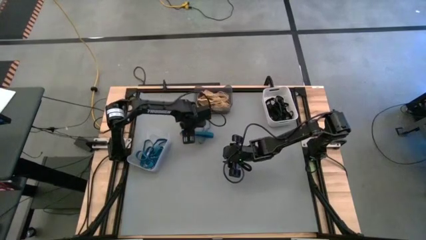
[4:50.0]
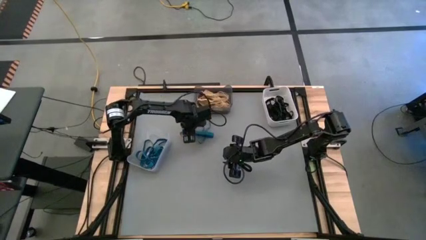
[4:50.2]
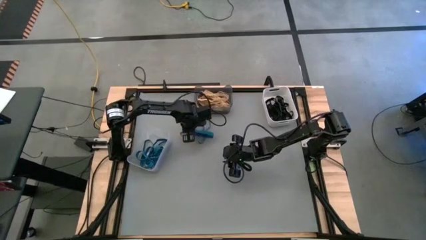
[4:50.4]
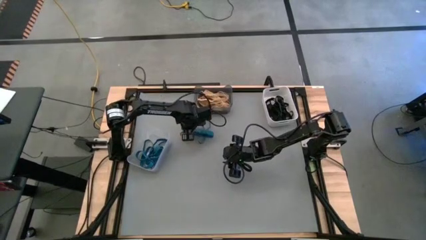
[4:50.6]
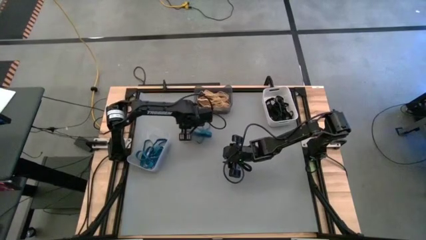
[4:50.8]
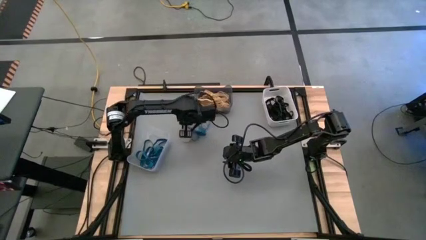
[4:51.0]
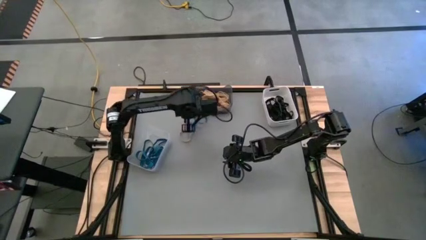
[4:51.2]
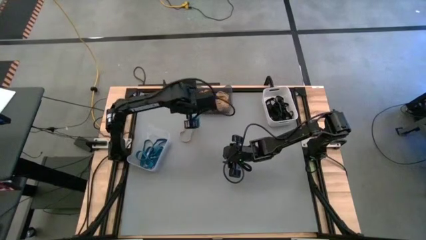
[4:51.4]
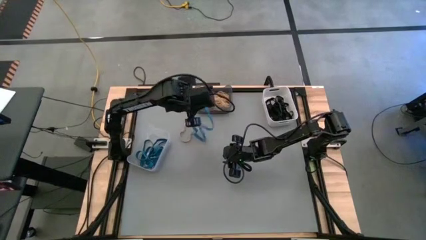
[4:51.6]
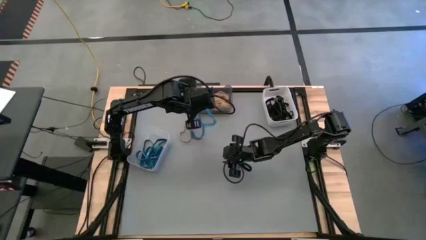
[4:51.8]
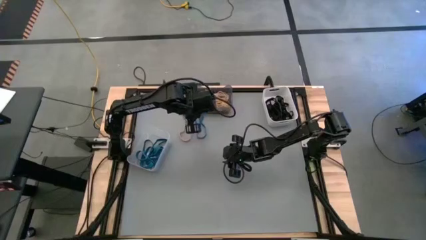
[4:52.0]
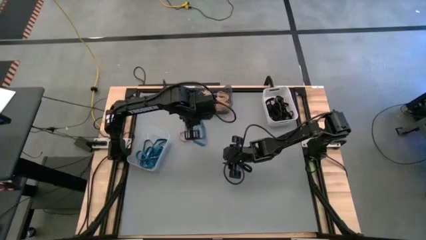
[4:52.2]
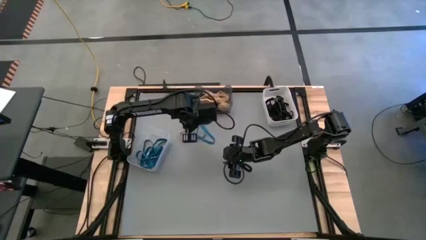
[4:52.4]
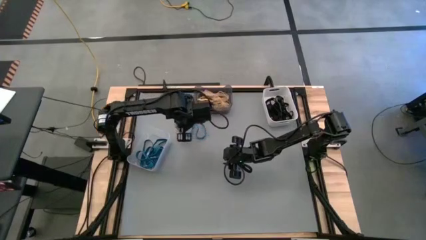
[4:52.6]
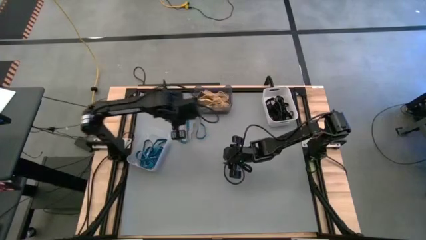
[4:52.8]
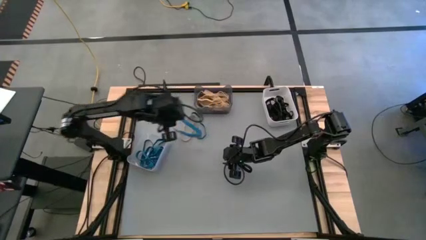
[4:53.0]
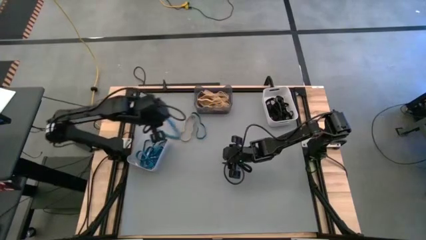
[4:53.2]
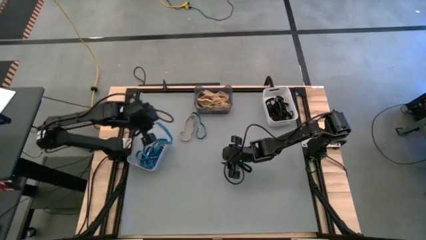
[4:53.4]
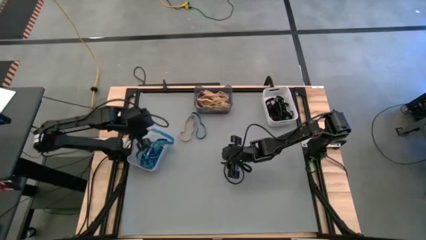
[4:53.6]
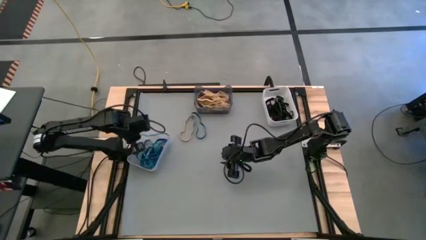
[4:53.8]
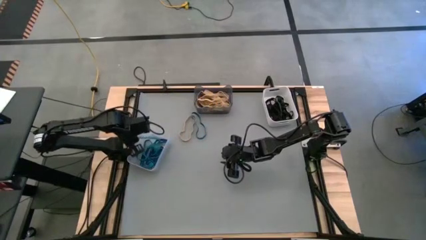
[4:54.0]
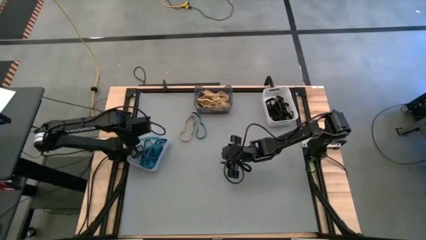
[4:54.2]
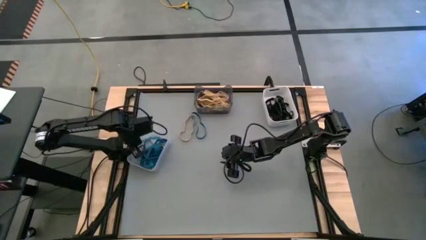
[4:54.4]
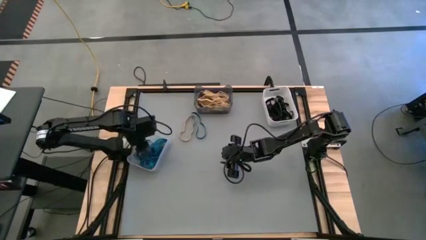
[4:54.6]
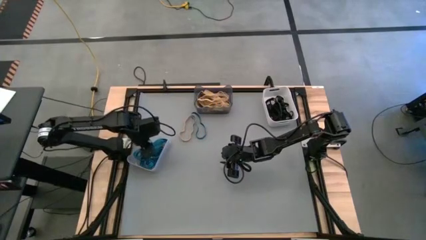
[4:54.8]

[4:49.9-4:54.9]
Task: Sort rubber bands into baskets
Put the blue rubber band into the transparent bin

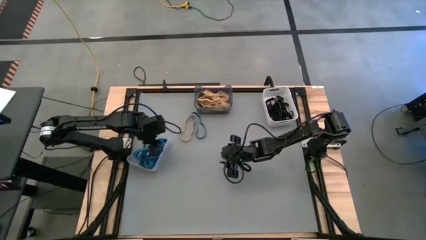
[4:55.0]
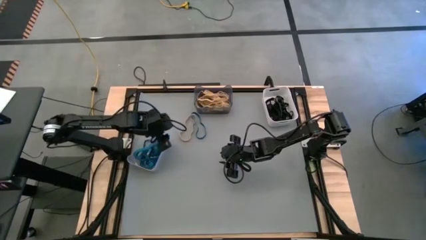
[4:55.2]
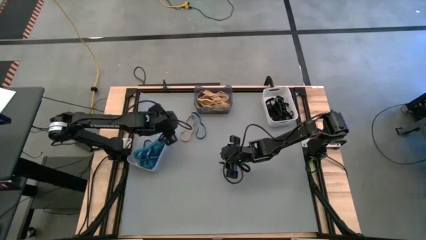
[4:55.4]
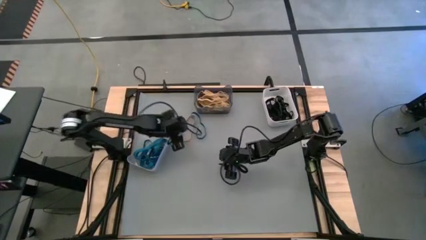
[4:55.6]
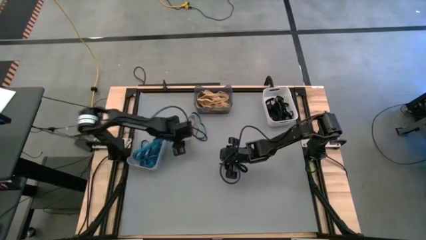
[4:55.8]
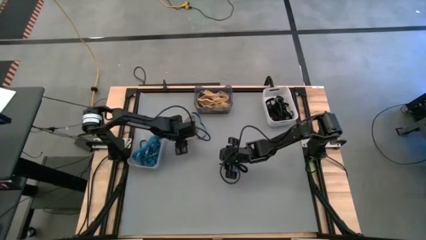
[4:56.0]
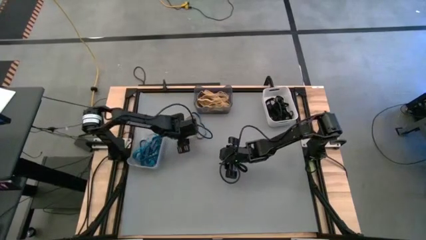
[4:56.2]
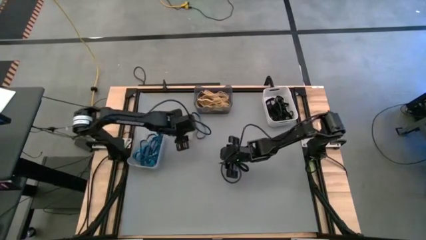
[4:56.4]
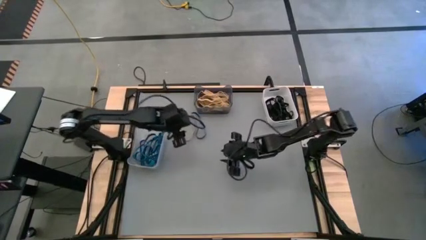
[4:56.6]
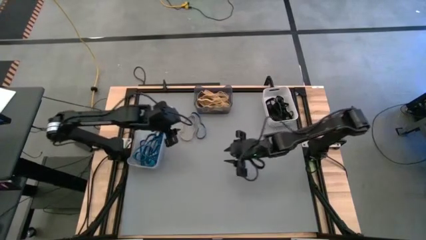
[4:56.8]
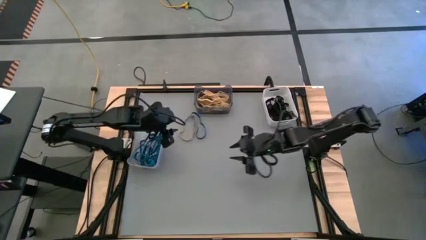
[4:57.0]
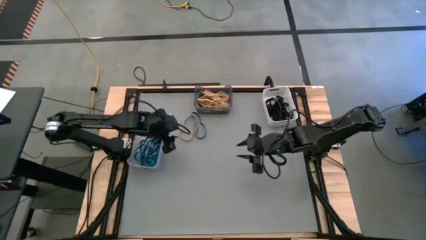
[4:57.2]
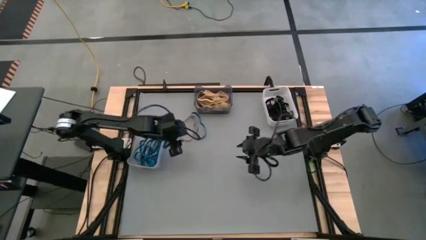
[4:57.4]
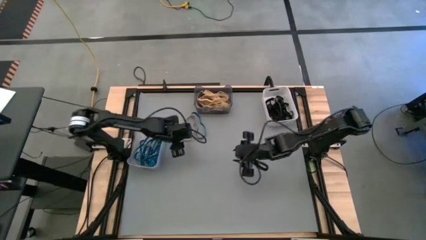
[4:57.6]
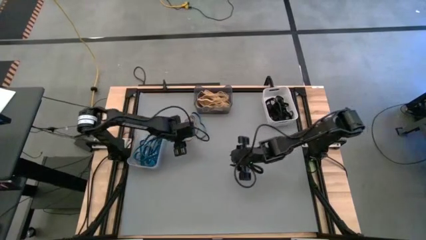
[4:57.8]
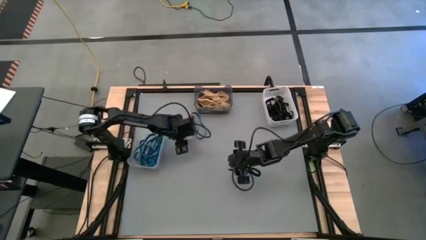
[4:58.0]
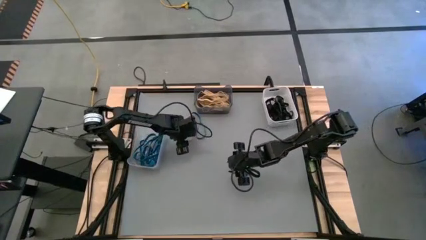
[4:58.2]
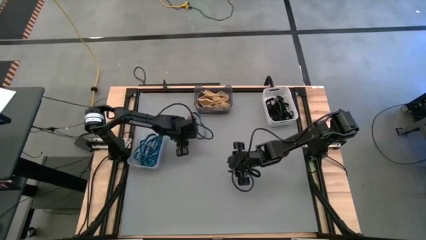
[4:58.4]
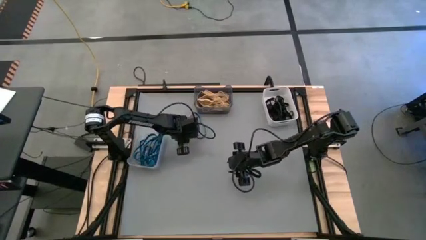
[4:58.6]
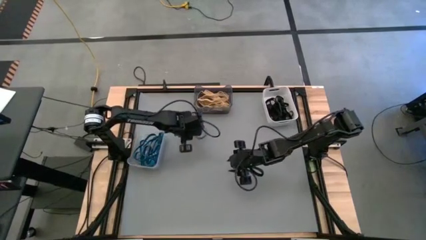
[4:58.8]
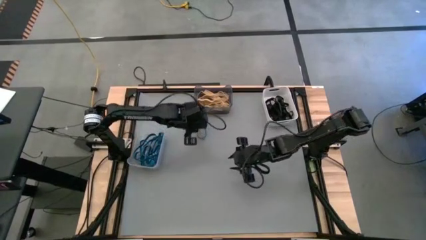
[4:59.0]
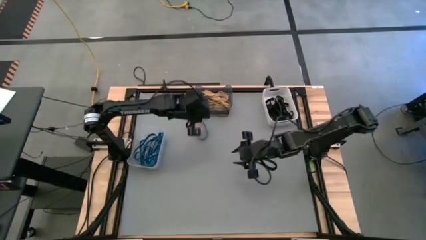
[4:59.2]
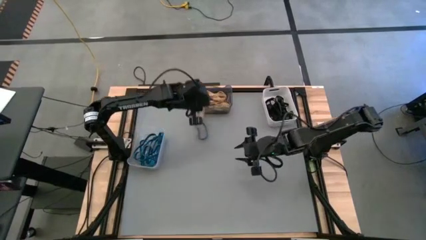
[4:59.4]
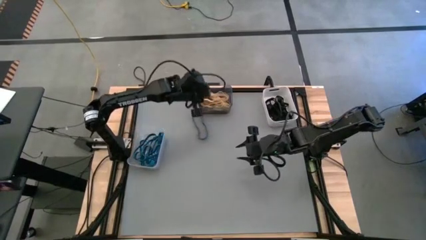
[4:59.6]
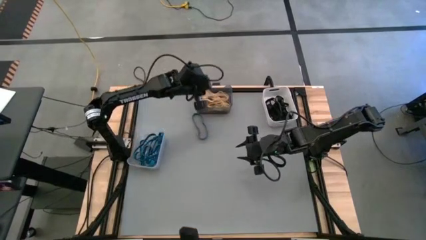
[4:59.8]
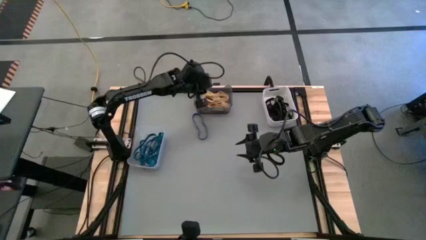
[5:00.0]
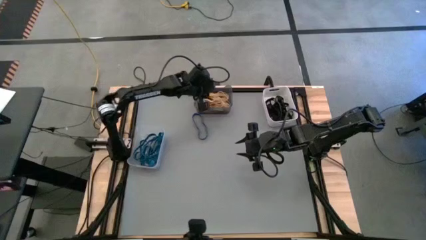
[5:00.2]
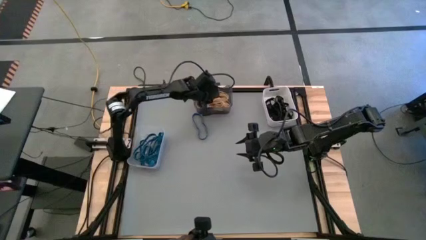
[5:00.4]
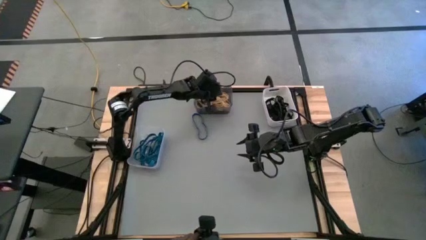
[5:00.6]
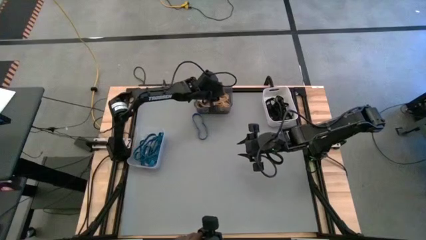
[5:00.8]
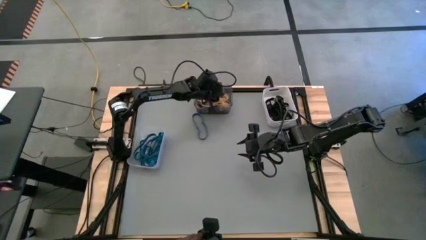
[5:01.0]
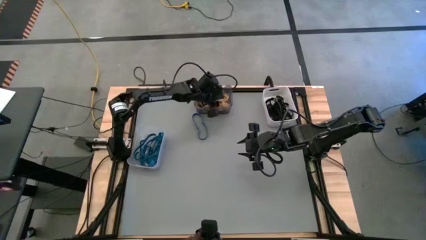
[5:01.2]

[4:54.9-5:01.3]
Put the brown rubber band into the black bin

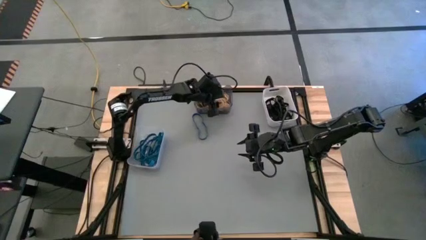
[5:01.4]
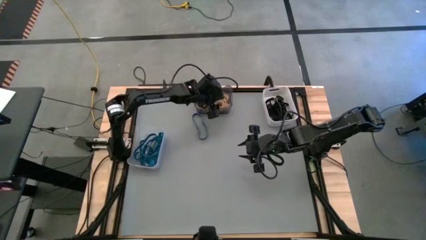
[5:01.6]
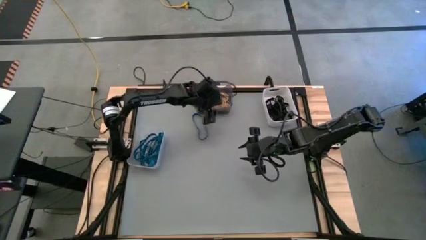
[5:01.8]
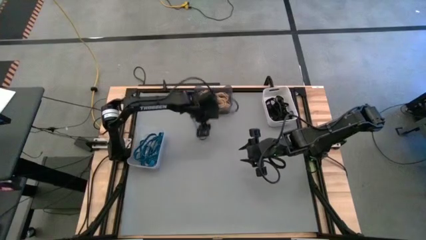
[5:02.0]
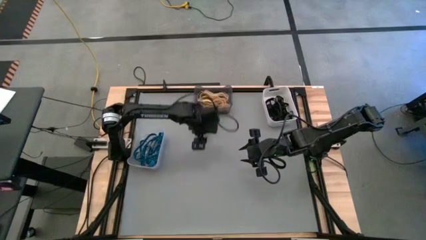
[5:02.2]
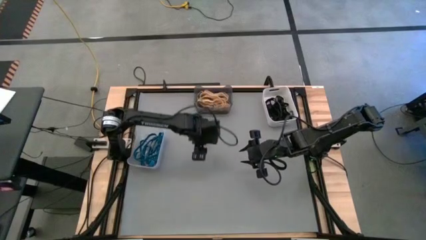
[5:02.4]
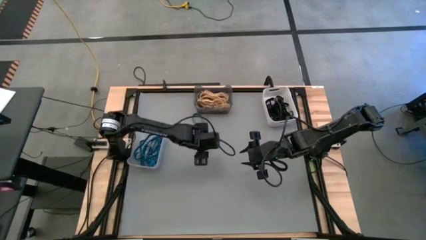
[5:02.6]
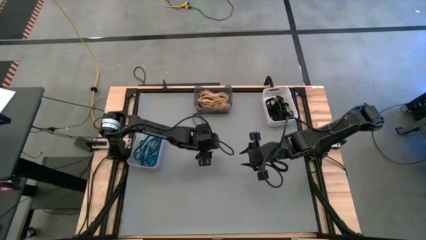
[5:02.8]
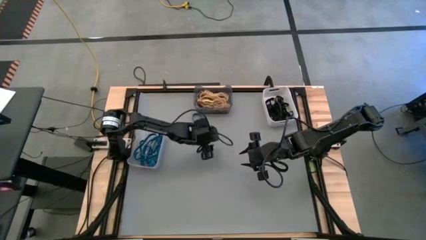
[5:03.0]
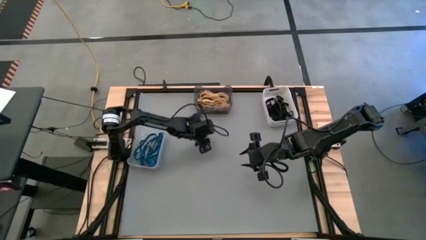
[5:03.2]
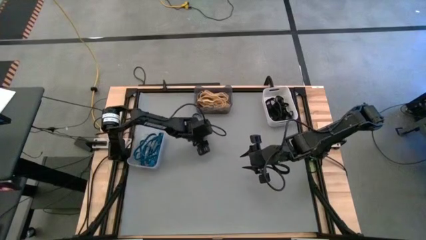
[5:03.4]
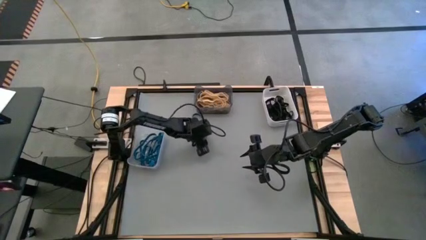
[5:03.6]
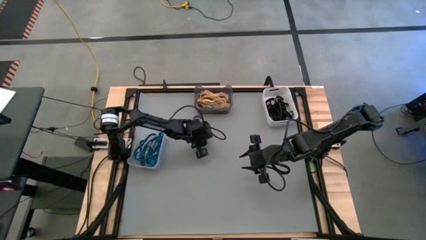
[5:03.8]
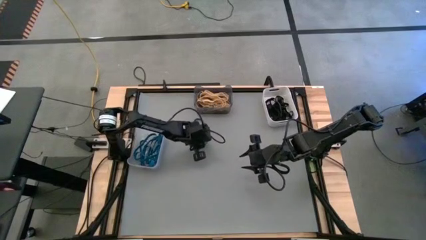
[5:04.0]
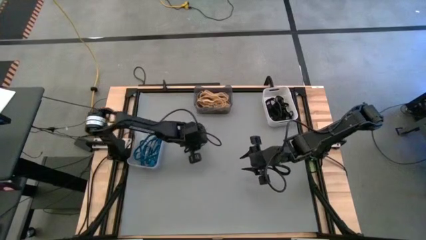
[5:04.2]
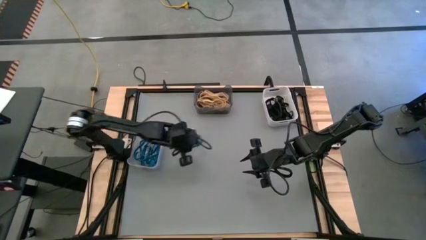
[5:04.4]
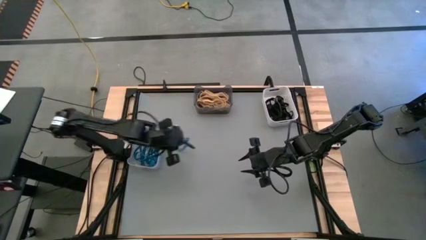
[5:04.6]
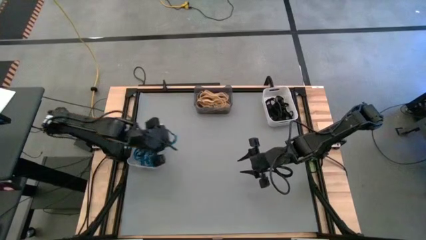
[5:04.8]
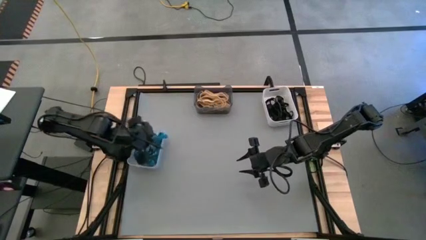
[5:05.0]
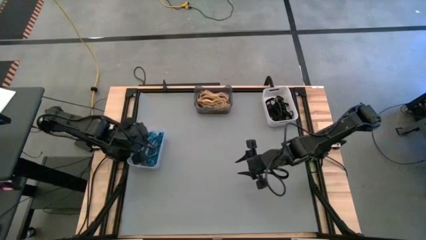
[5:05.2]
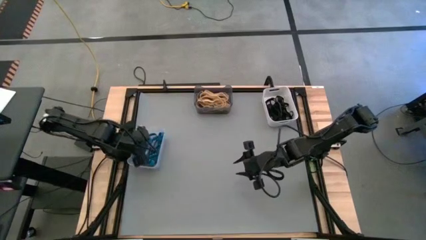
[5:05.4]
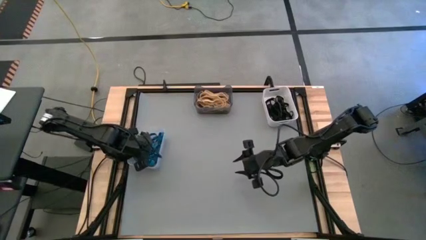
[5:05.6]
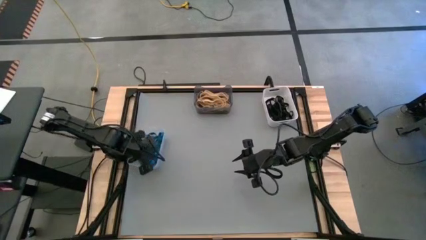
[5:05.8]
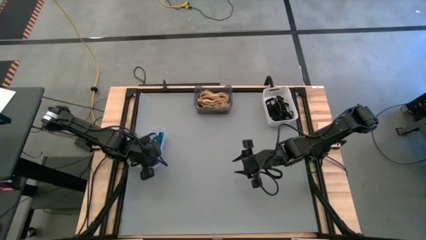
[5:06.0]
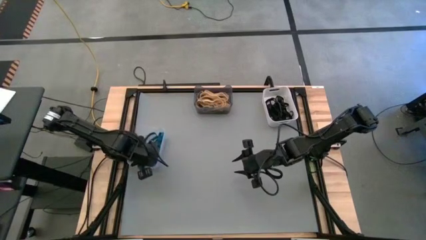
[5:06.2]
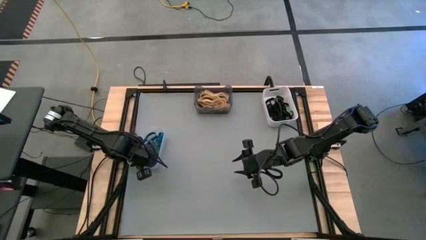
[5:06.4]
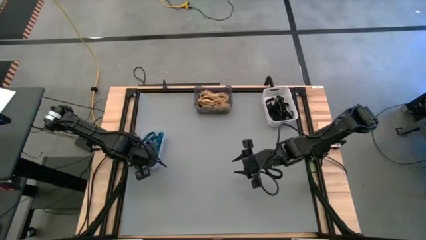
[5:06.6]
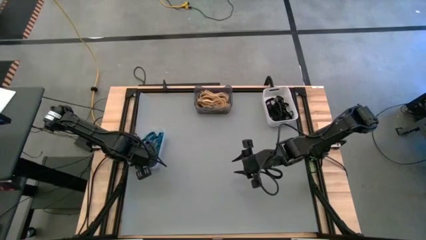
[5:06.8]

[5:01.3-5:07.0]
Put the blue rubber band into the transparent bin
